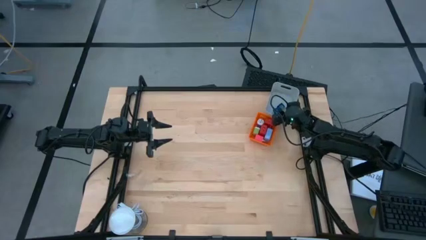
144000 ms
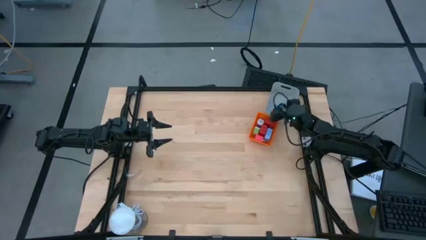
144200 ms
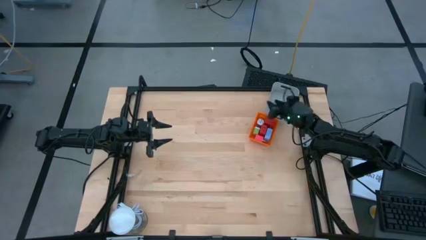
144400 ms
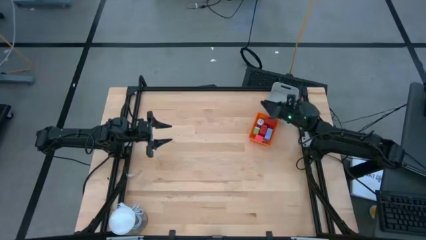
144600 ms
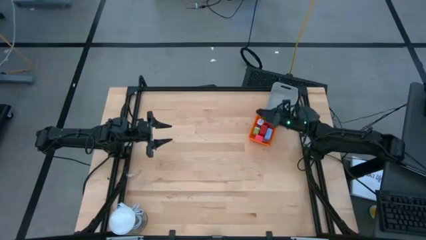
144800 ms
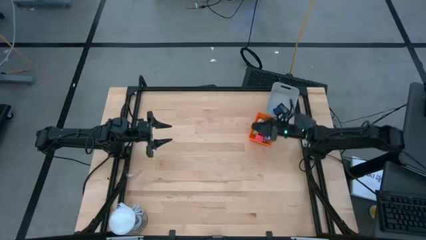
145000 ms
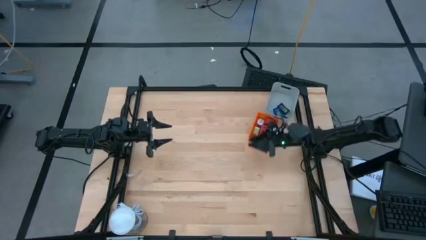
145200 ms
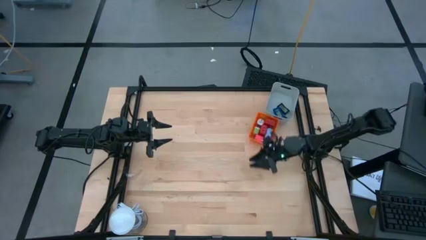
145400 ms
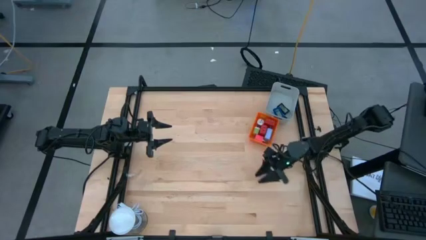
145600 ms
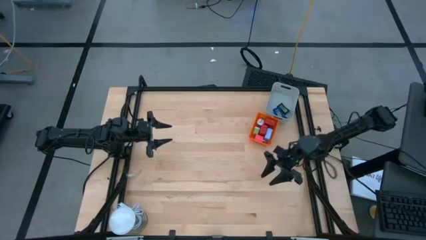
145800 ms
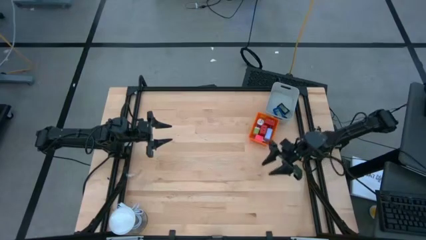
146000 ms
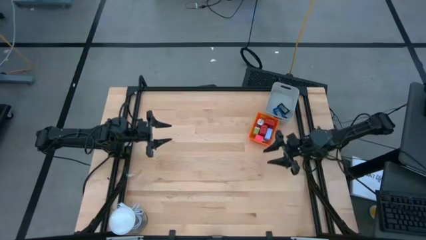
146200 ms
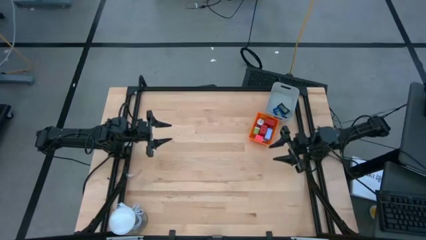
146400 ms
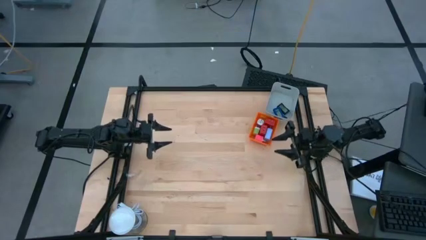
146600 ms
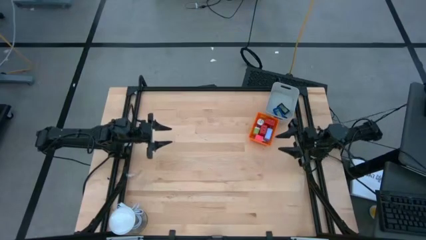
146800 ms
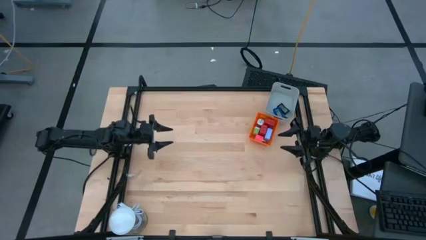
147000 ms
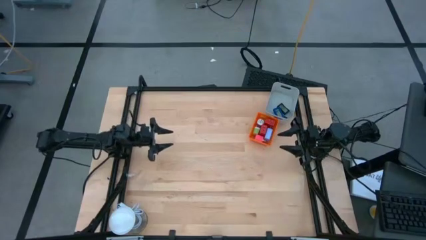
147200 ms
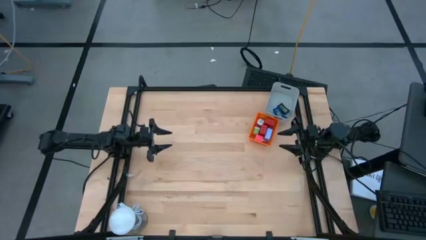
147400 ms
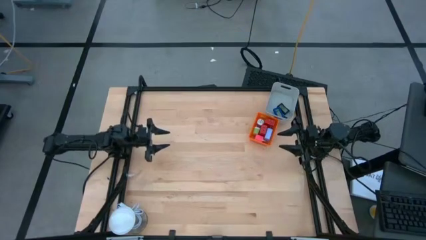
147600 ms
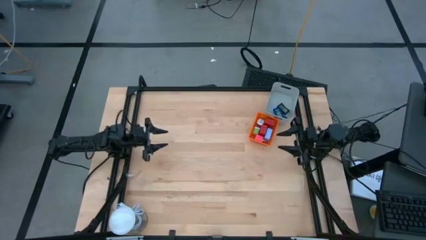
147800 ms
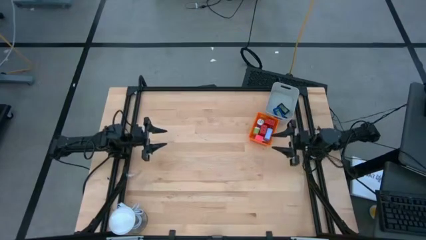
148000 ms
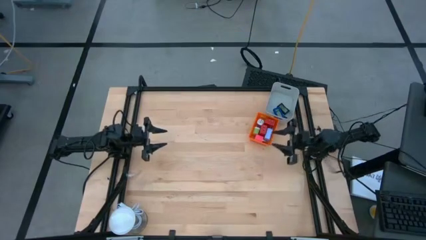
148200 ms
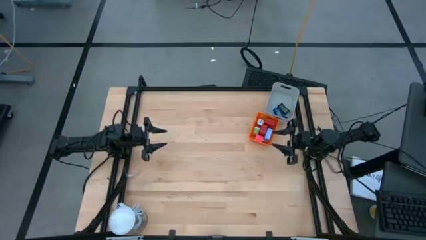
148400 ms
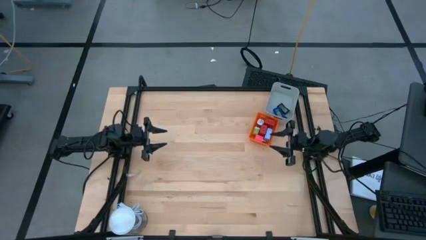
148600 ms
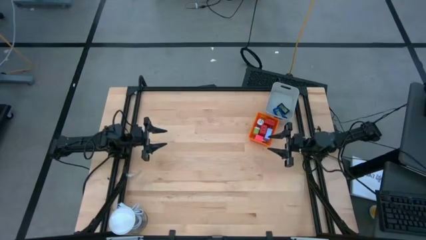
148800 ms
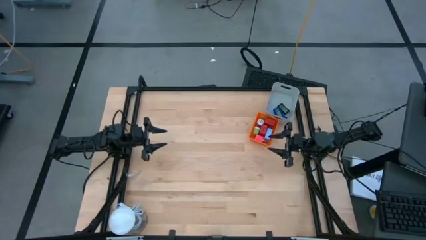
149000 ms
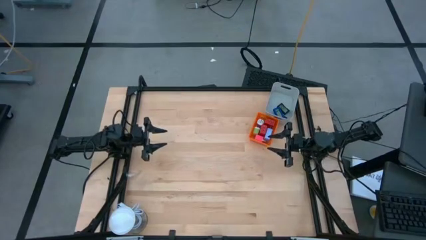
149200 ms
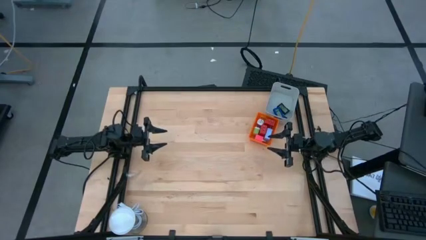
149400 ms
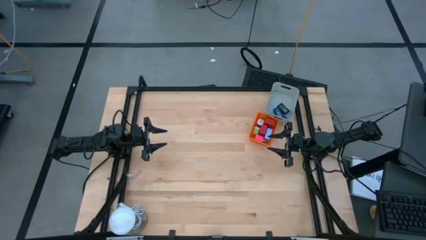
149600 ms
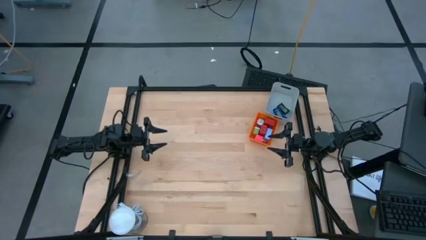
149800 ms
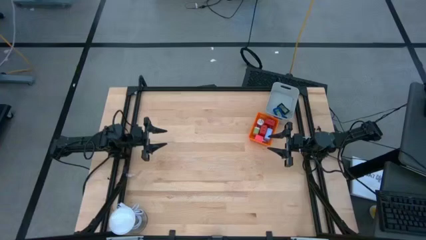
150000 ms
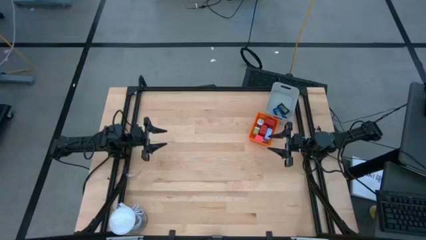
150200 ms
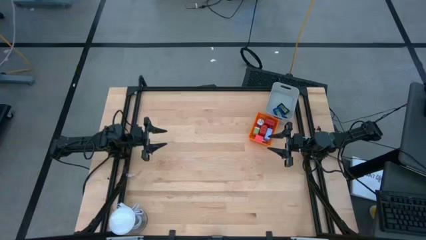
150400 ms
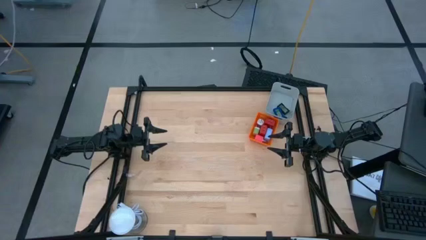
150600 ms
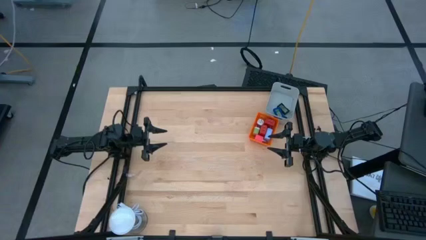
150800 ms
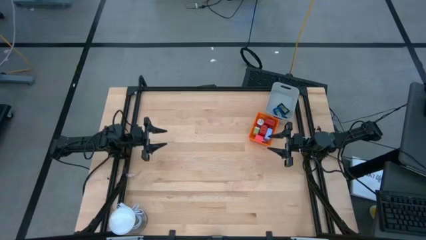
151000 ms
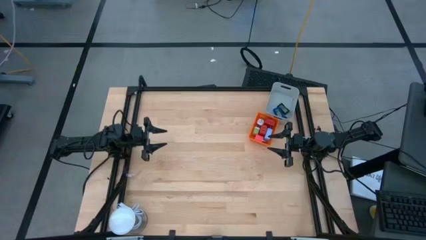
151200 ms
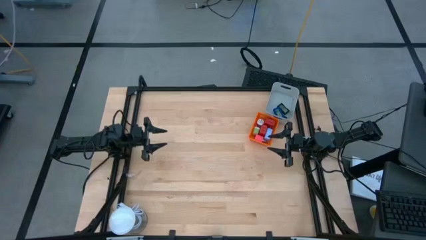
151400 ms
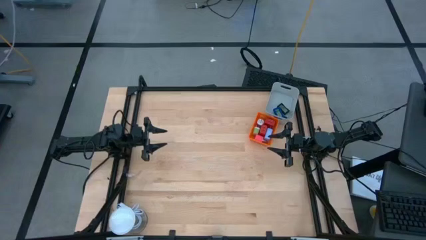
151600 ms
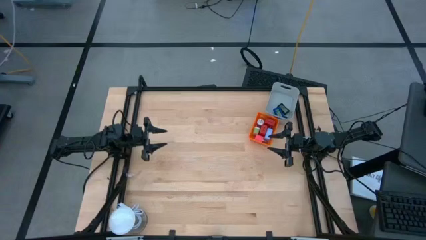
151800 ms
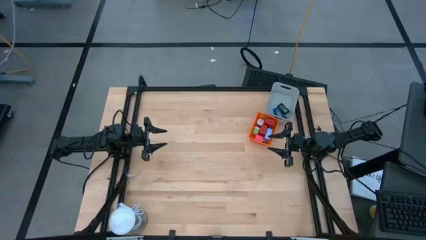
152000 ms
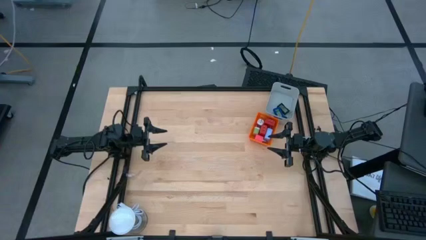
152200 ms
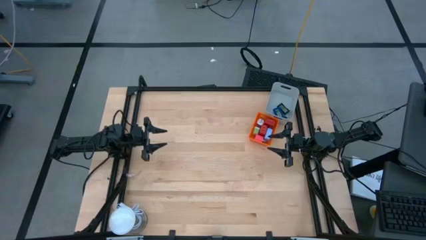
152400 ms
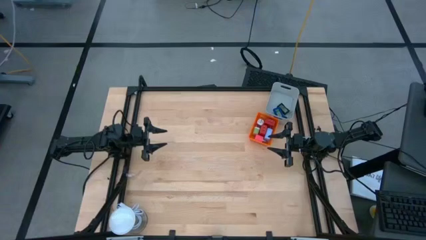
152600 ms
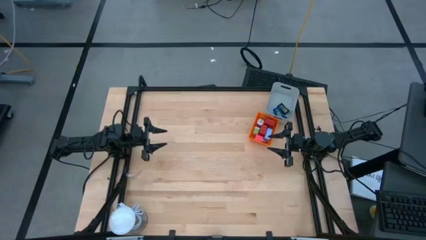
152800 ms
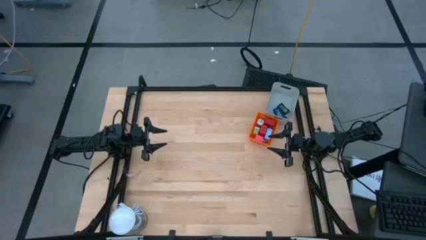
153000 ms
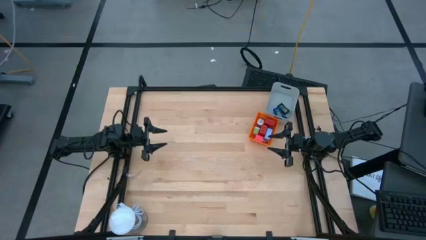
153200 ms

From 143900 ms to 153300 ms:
Task: Pick & Place Office items
Return to Home Position

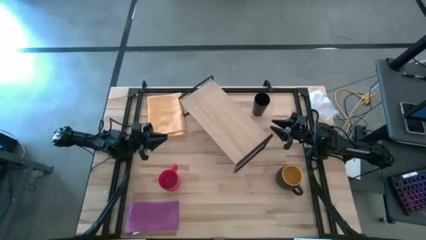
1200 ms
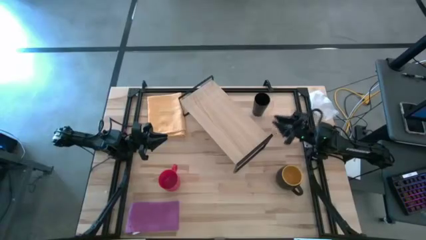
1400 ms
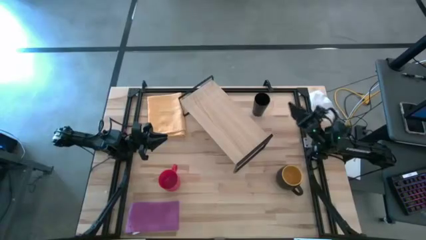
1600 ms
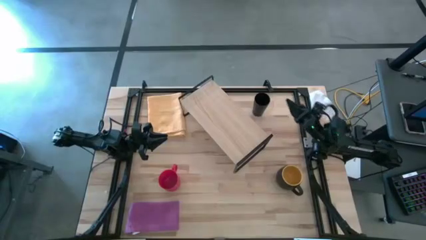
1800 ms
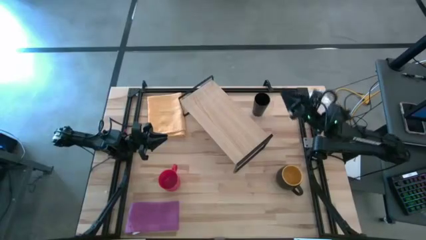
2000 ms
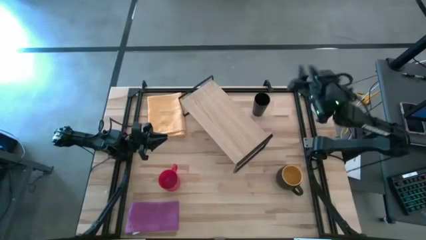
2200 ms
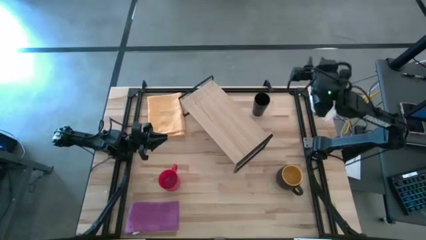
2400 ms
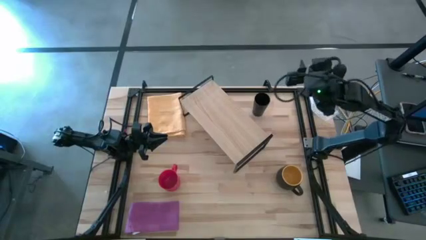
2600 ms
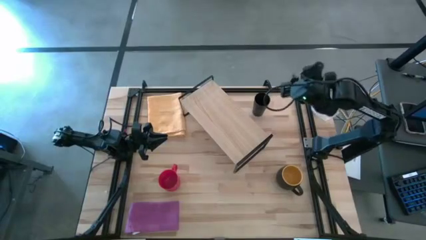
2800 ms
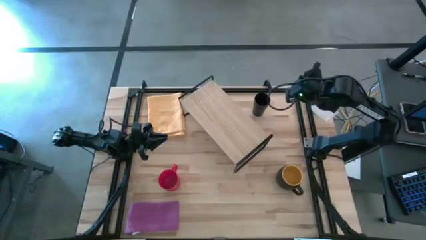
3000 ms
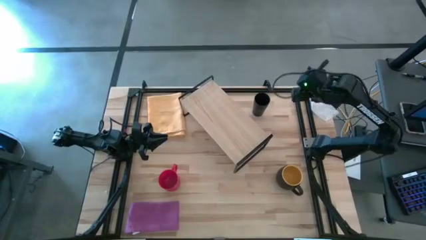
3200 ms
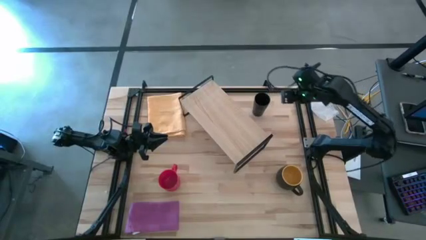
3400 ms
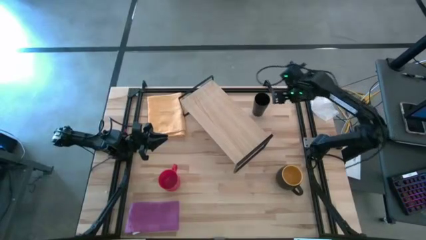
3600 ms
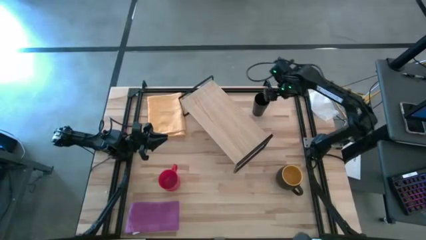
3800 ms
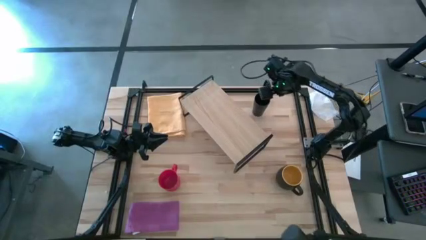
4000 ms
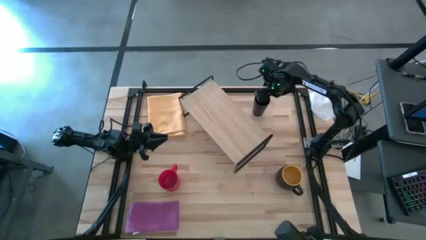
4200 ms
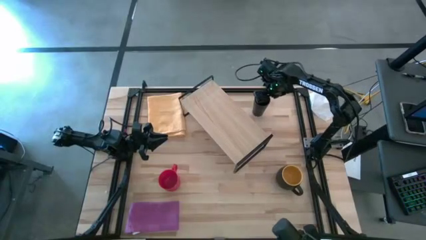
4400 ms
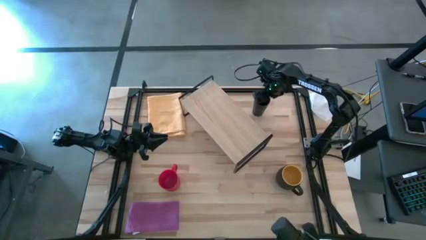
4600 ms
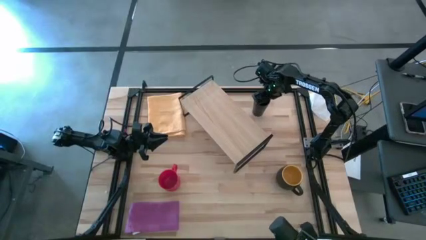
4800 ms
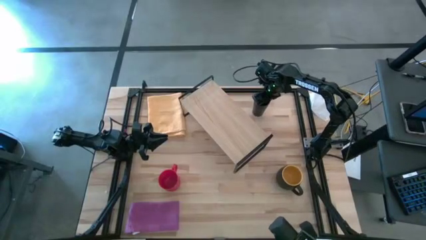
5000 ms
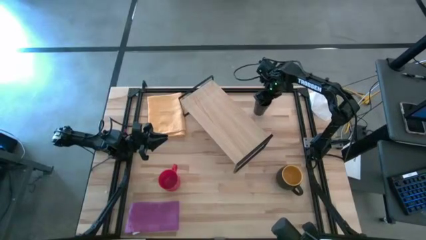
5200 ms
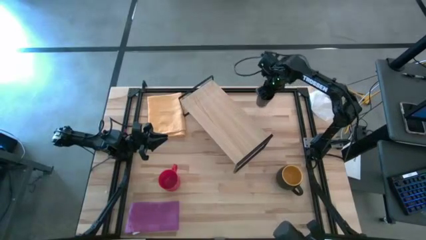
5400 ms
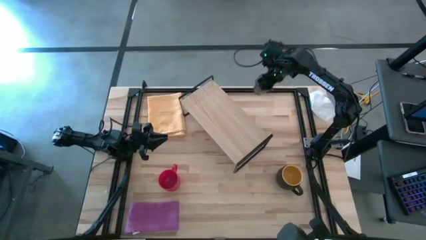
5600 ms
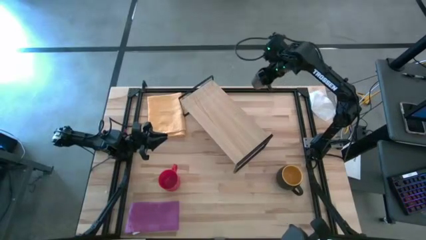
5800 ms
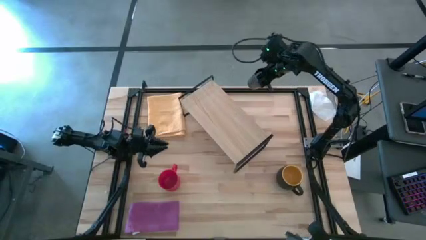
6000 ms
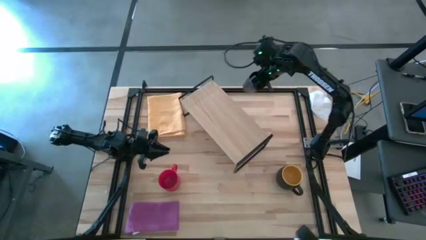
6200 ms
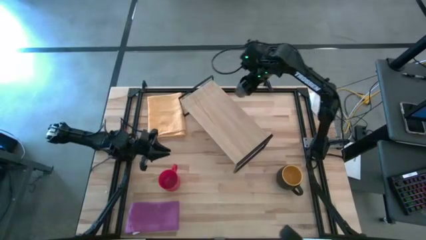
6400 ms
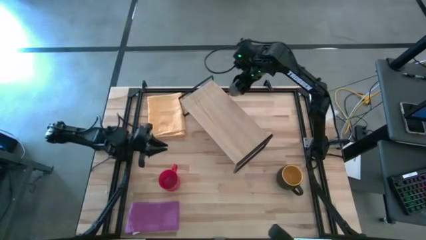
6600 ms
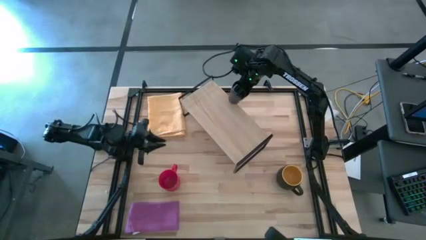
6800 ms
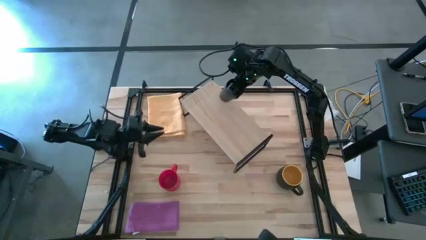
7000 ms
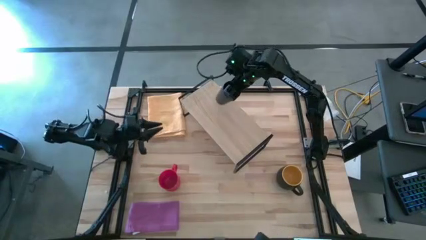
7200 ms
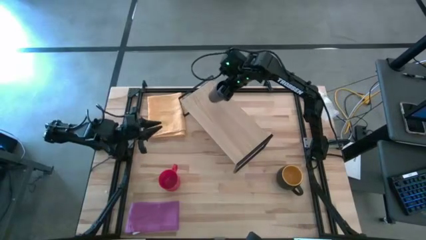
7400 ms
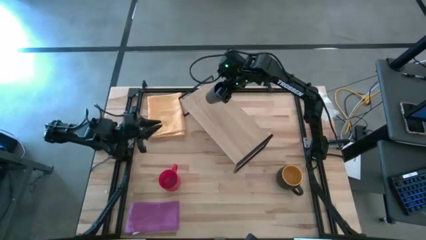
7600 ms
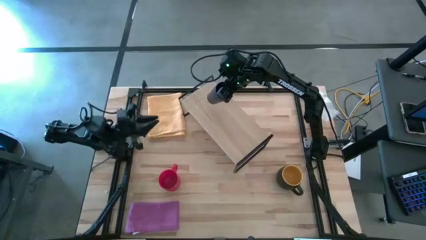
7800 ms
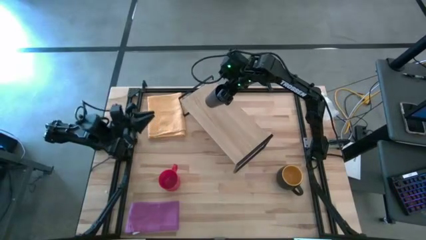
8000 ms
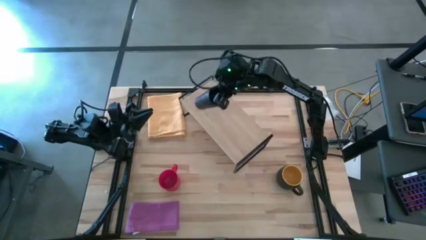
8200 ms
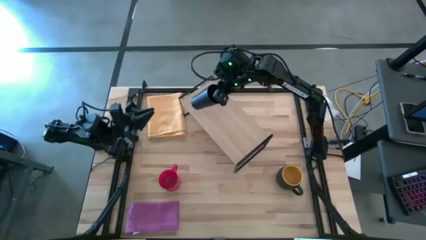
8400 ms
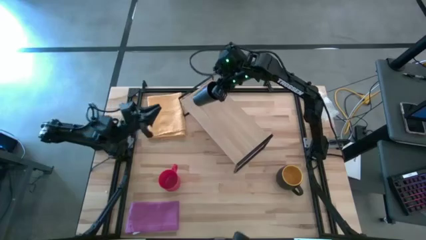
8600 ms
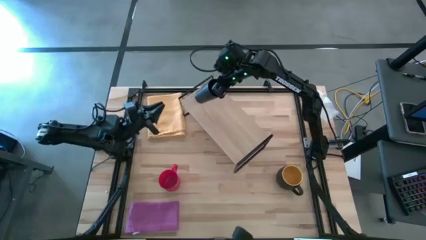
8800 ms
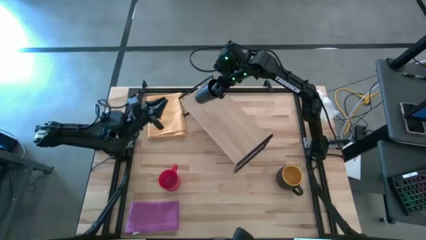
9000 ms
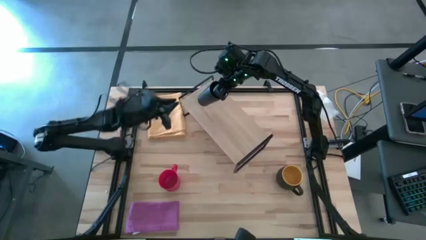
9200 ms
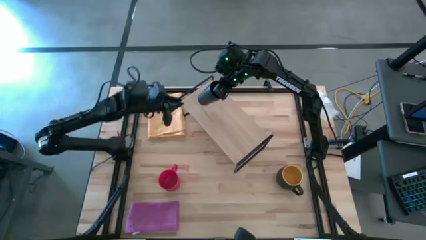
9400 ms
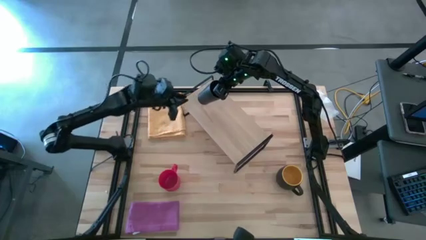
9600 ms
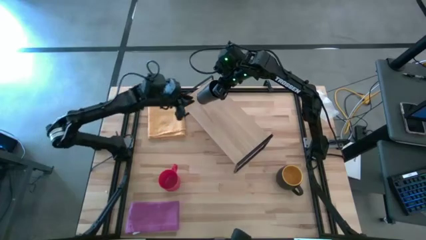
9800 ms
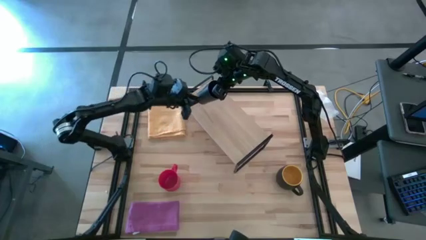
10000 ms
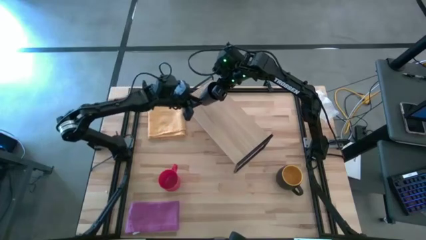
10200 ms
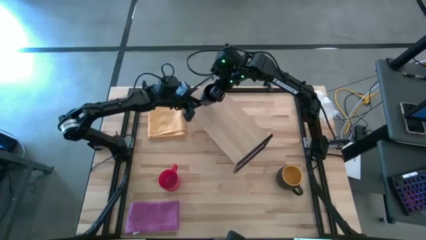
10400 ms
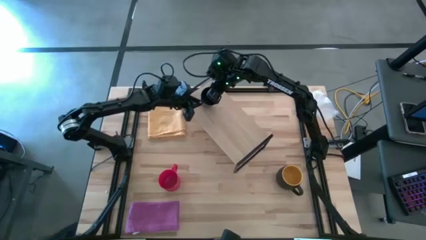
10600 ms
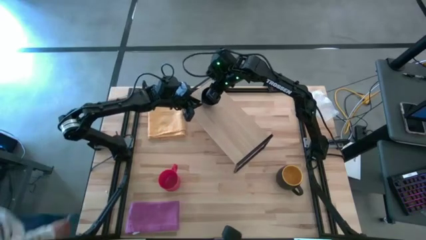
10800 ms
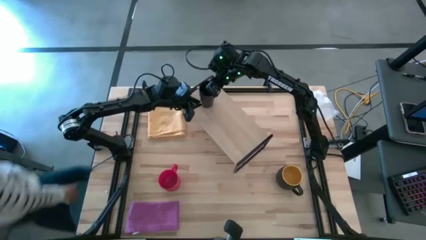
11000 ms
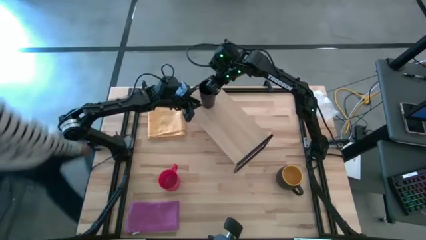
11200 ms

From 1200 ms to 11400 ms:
Task: Stack small to large cups/mugs on shelf
Put the black cup on the shelf
